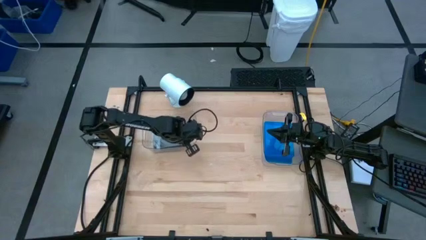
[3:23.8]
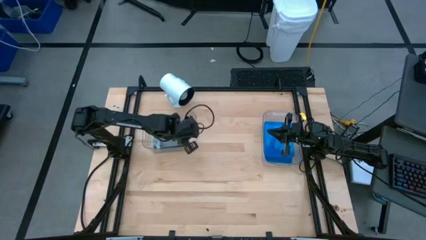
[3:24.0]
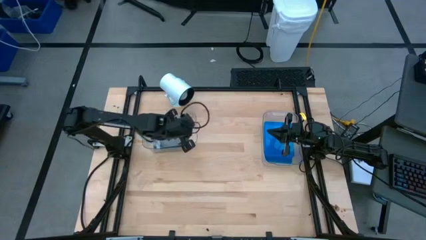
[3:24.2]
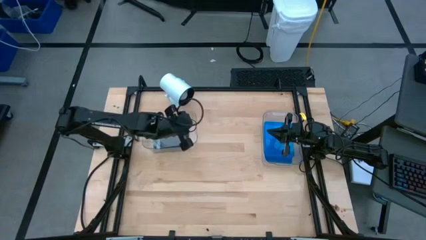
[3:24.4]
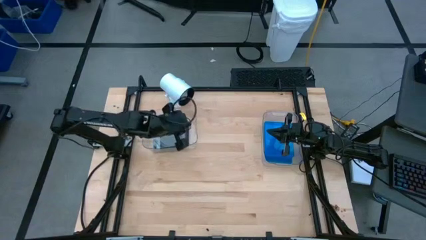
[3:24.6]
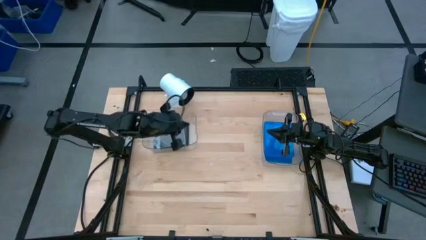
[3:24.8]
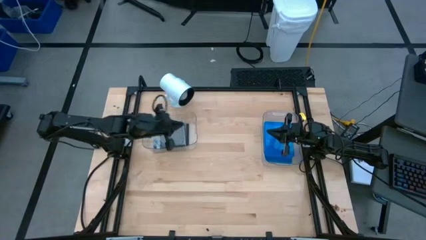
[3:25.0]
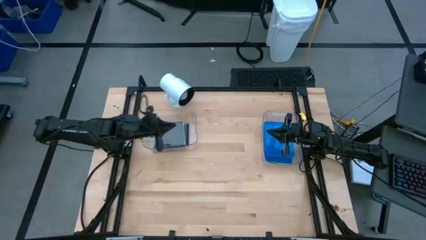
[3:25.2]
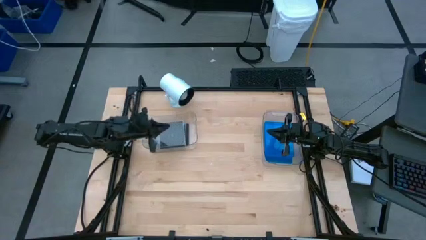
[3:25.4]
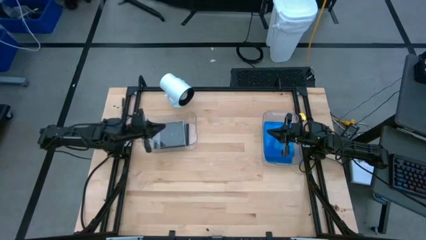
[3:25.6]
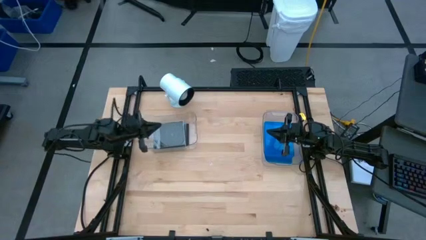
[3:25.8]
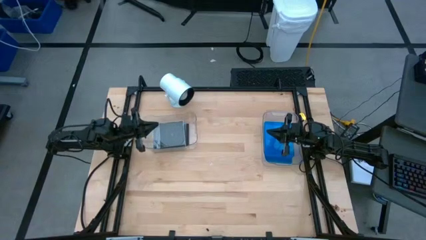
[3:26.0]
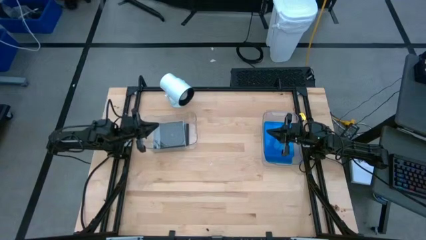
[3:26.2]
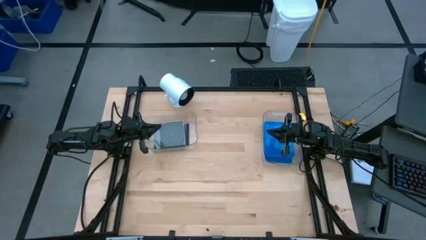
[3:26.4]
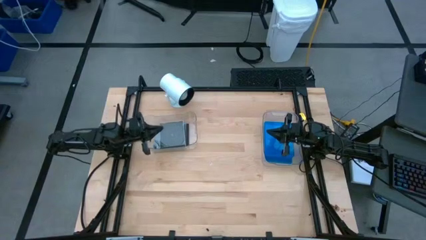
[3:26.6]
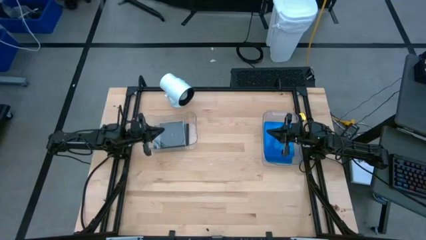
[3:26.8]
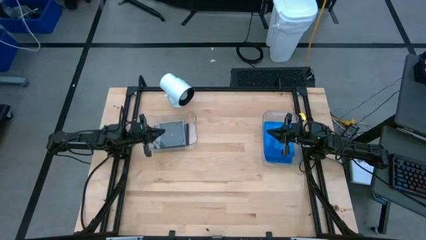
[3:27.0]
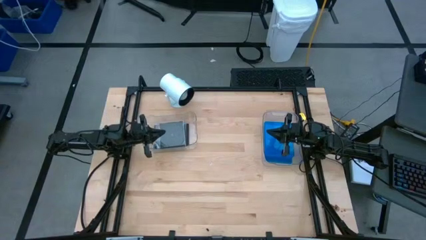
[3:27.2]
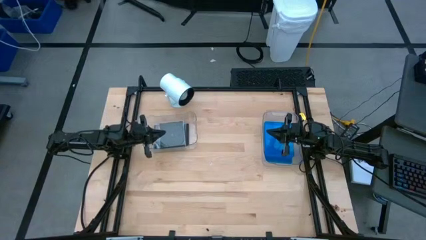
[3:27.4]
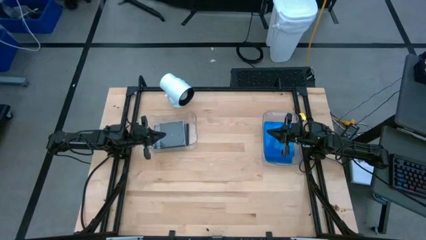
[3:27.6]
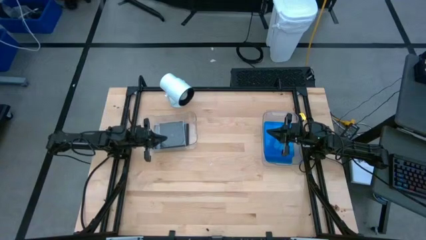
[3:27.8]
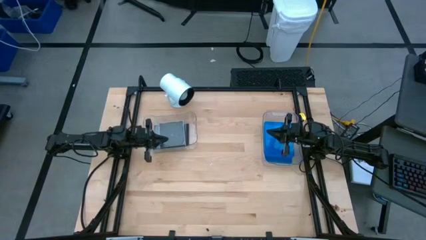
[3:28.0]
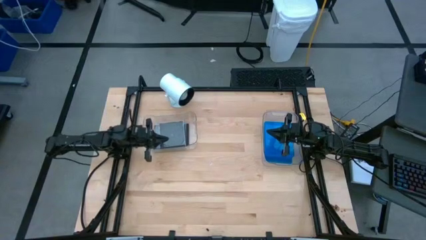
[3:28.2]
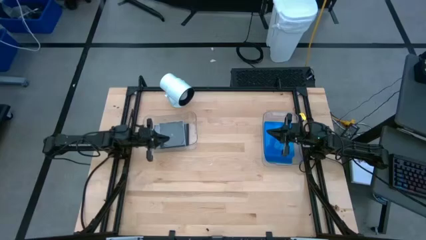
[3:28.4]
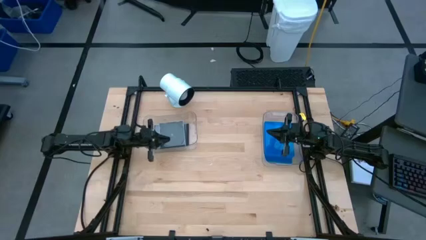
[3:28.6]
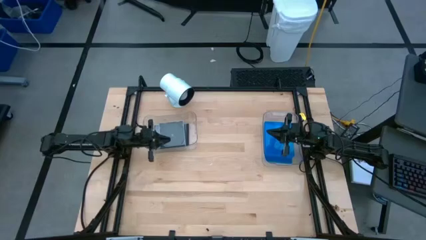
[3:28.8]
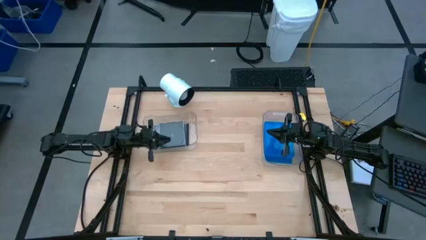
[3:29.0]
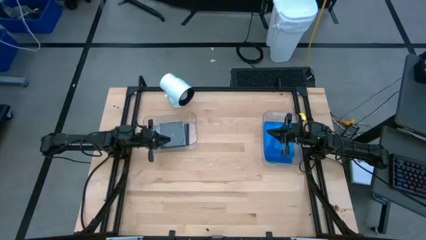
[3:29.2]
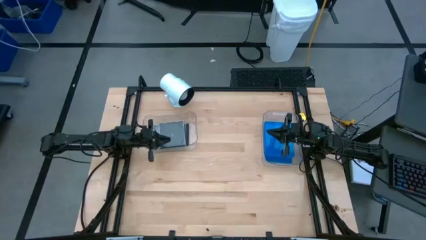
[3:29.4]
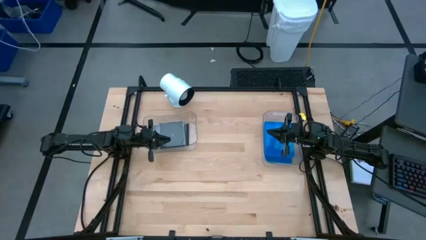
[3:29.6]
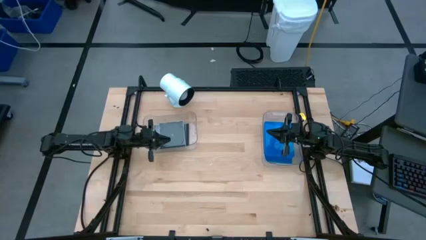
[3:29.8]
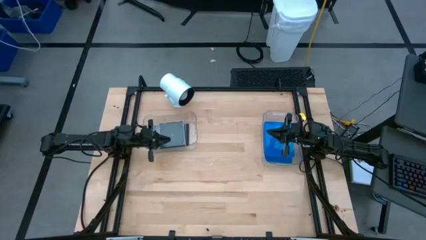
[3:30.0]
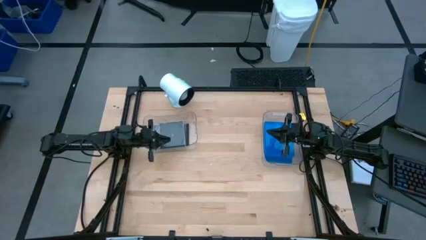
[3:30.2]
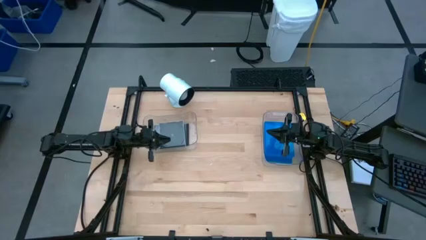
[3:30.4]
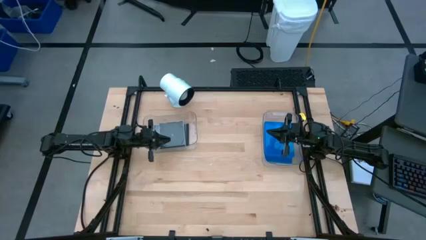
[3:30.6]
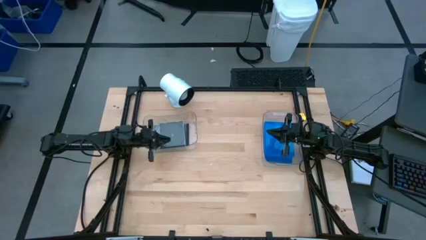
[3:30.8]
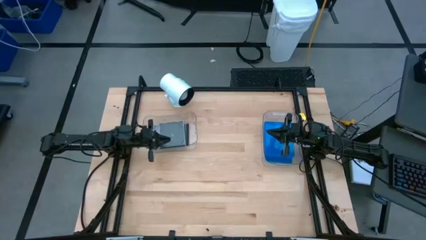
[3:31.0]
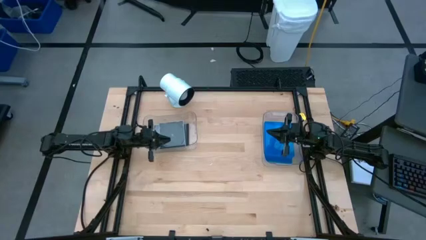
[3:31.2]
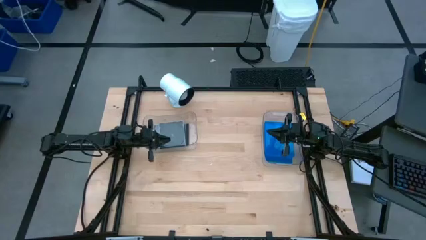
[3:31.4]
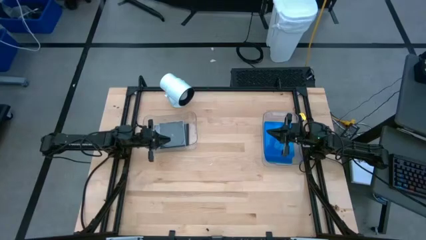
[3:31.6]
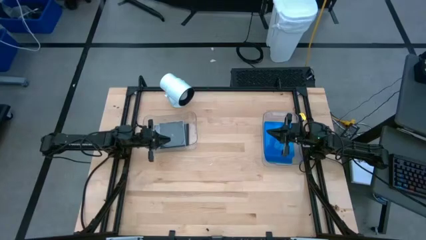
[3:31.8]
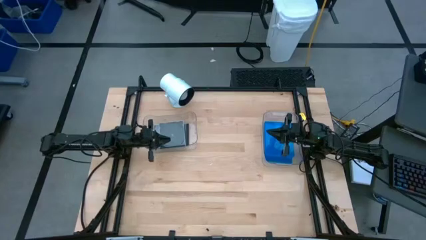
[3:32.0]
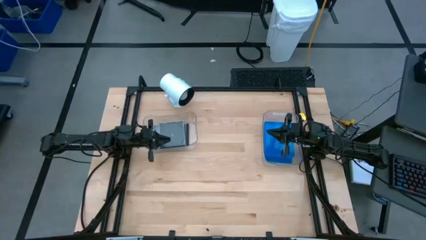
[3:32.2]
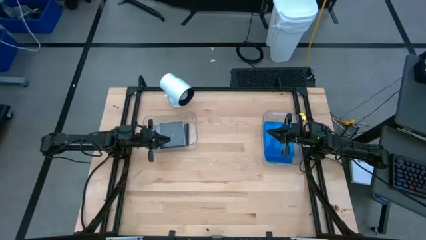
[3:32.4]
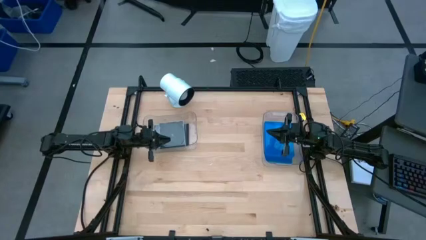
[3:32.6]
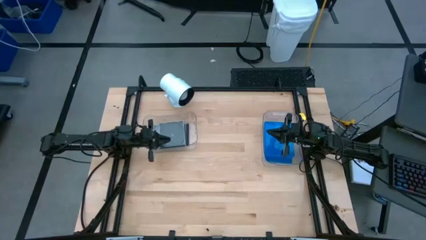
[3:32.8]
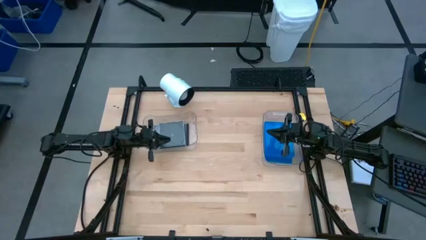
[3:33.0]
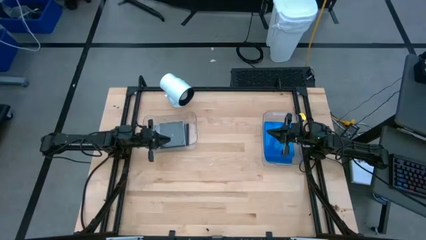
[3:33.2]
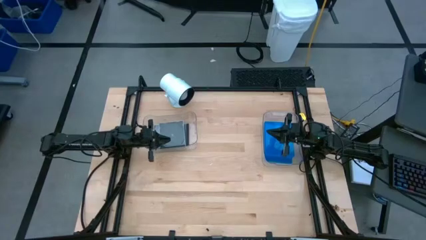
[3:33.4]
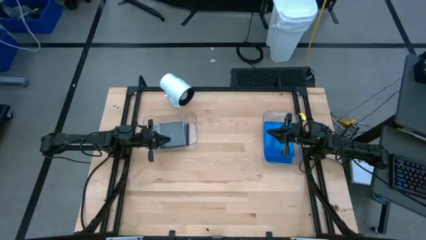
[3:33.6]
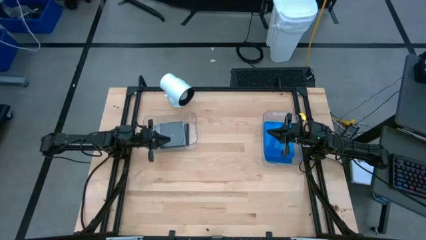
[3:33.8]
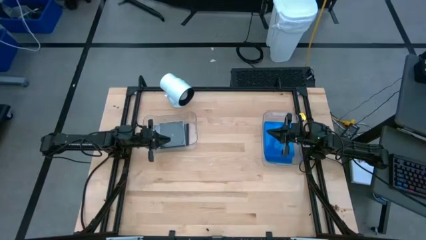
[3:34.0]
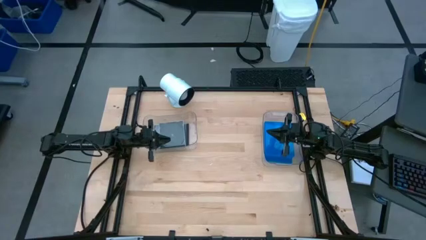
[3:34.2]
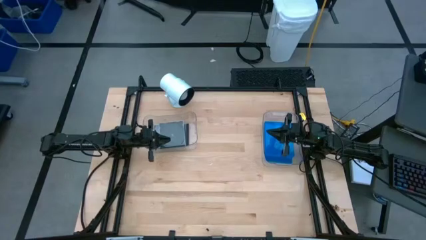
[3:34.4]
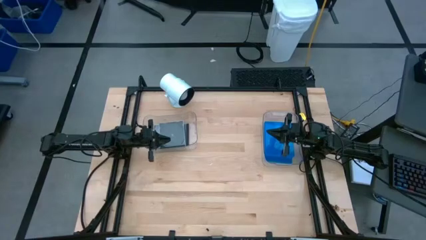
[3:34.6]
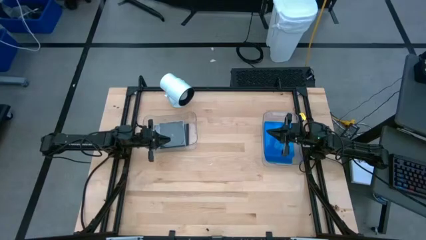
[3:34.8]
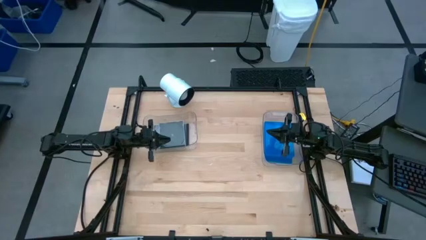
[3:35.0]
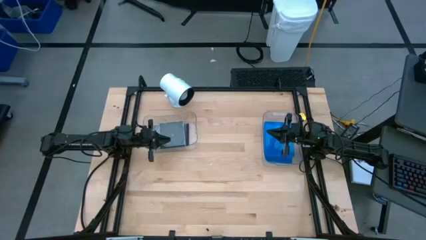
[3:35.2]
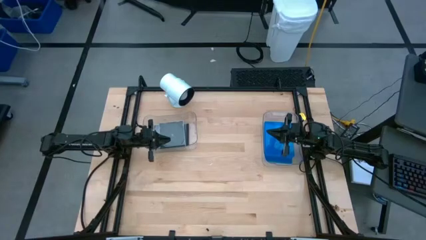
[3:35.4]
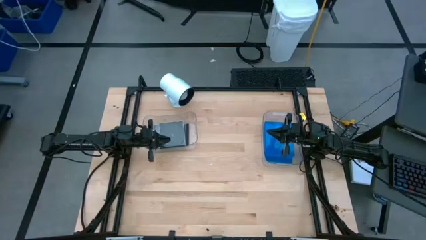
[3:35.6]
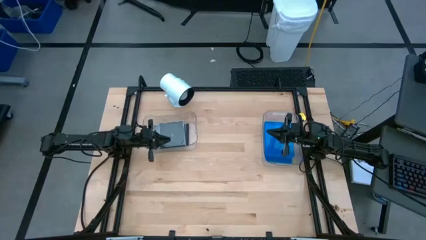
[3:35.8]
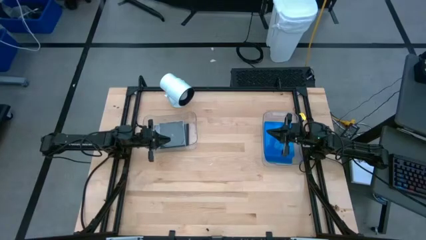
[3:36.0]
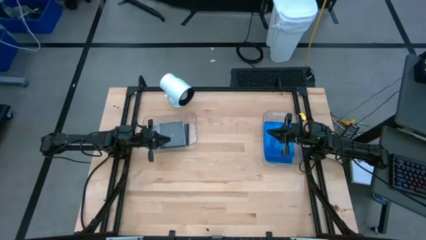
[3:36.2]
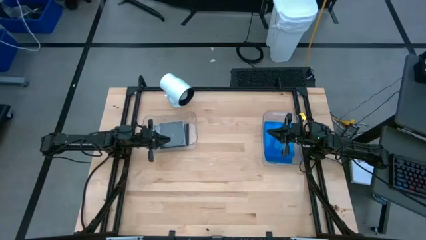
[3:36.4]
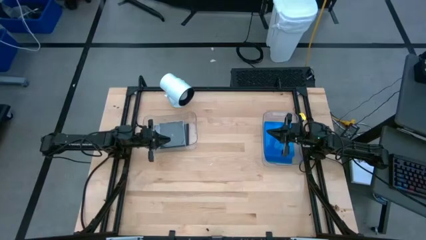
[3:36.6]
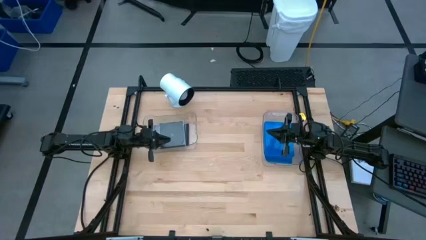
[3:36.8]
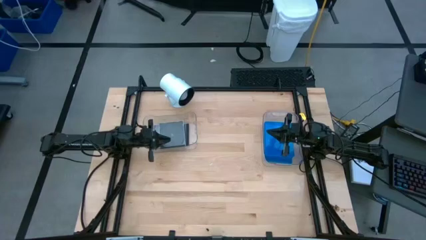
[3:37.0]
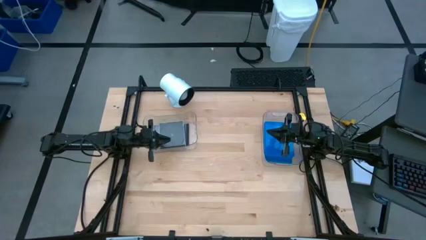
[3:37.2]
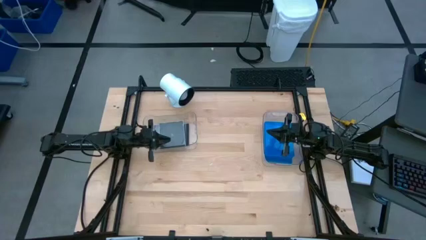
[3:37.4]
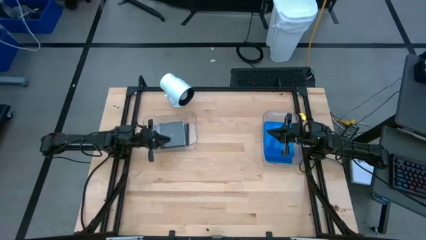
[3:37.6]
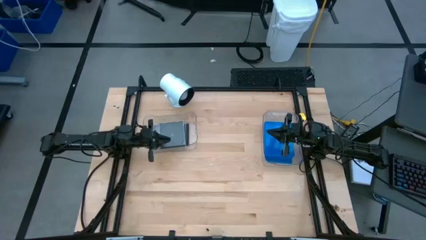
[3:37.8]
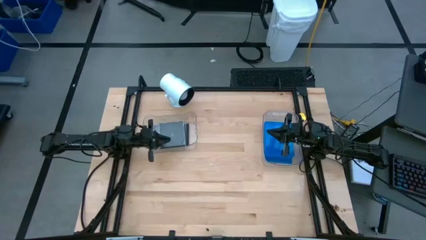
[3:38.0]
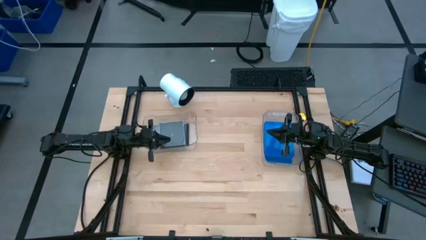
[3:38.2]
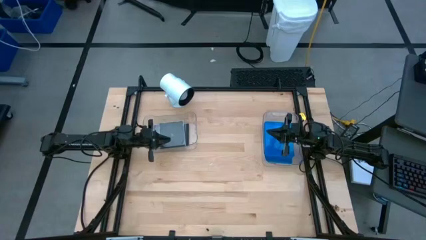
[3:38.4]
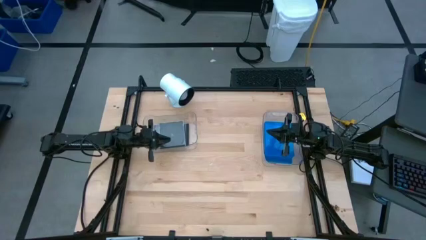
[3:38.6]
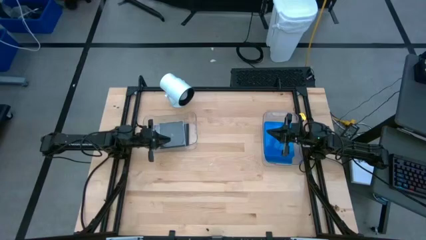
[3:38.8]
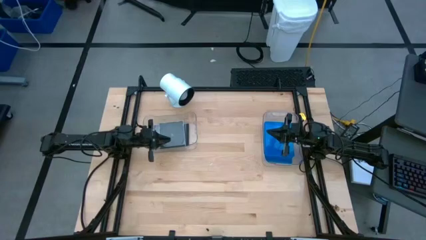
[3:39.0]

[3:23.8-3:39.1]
Task: Pick & place jewel cases by type
Return to Home Position
